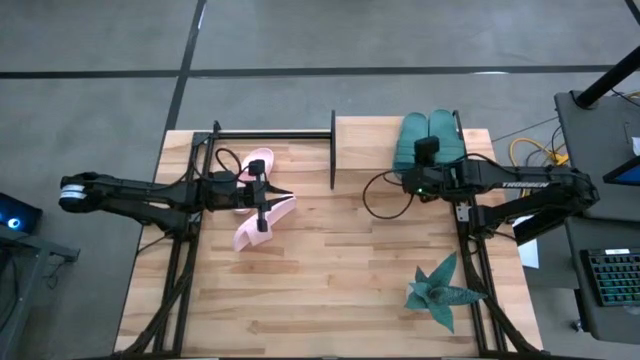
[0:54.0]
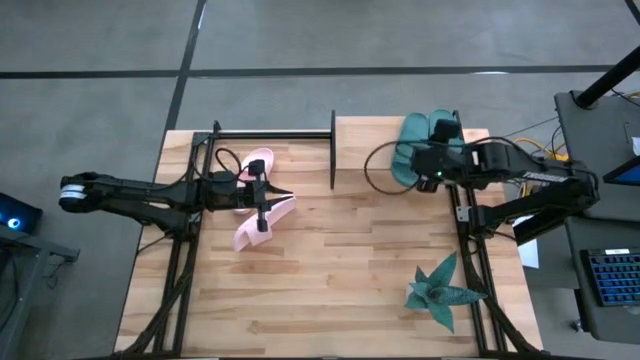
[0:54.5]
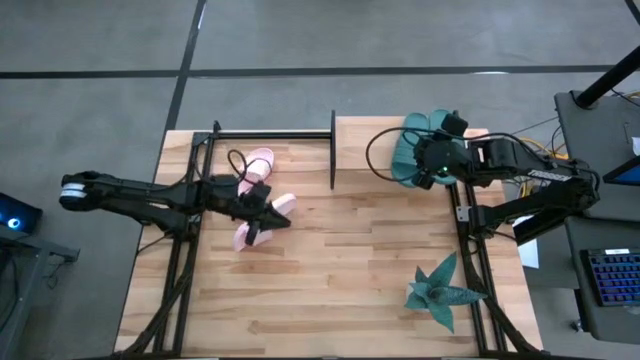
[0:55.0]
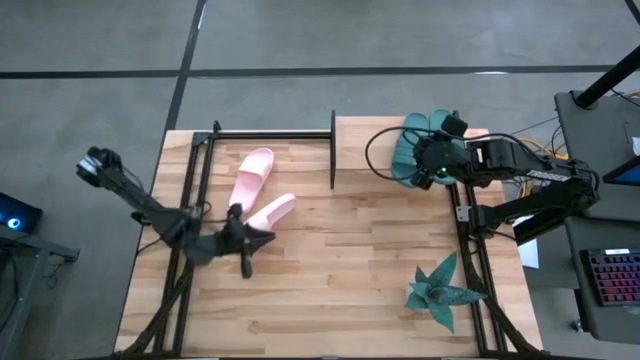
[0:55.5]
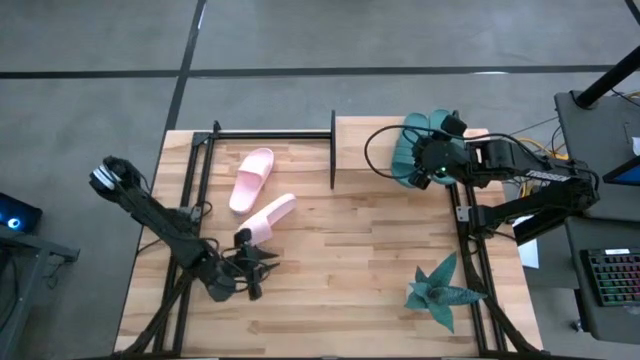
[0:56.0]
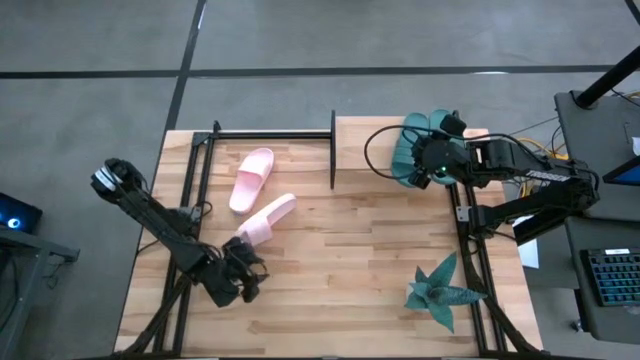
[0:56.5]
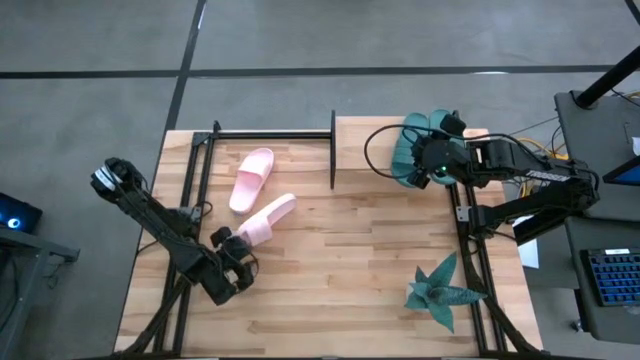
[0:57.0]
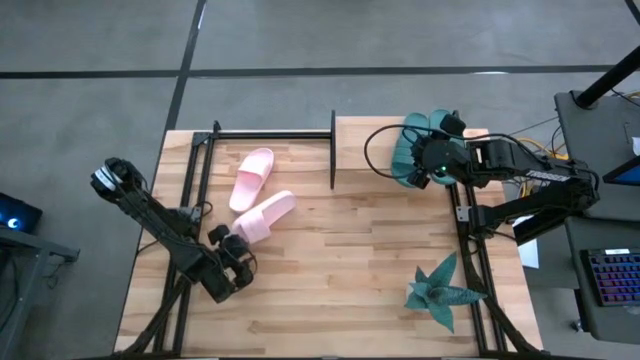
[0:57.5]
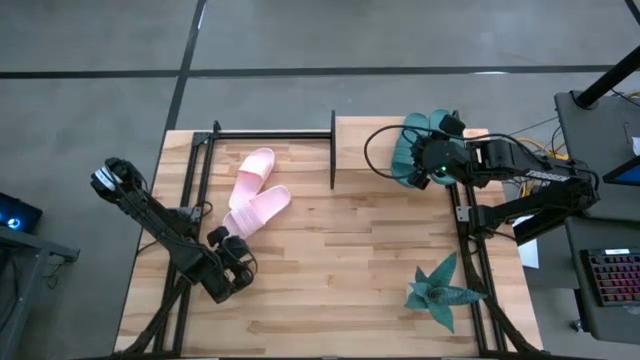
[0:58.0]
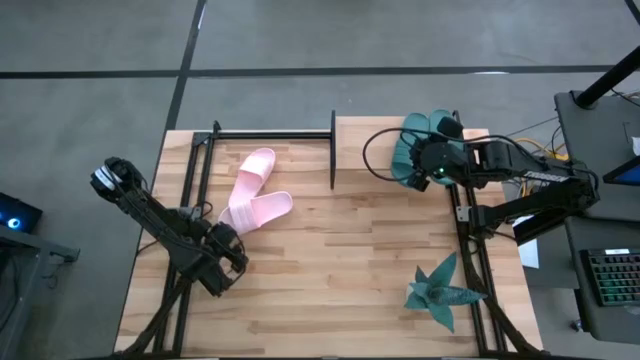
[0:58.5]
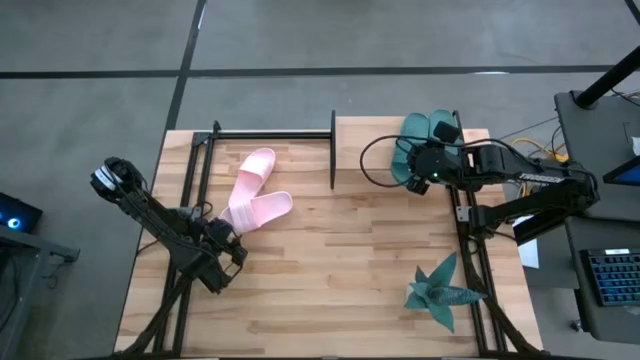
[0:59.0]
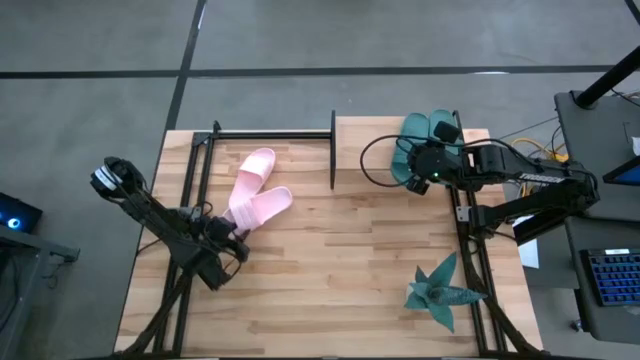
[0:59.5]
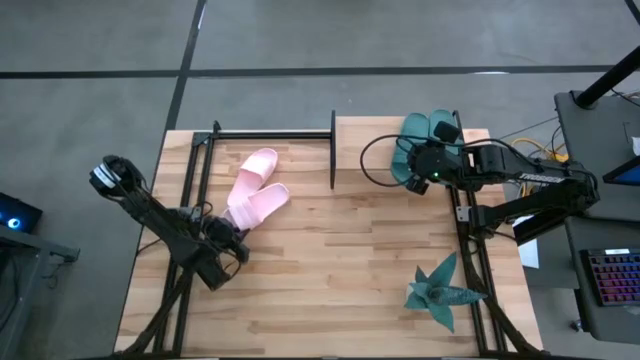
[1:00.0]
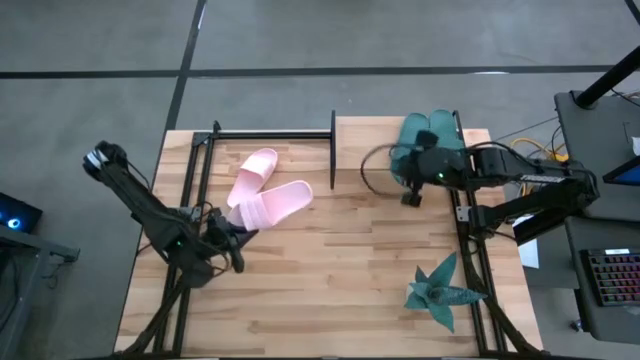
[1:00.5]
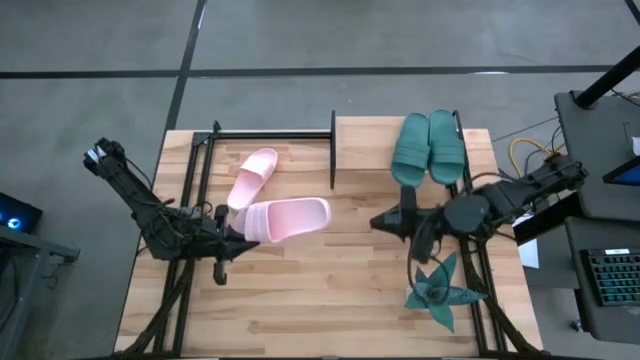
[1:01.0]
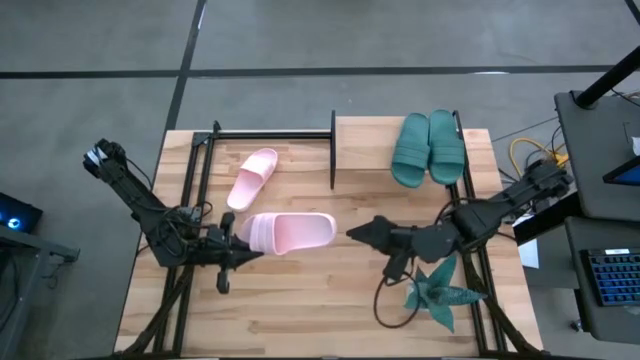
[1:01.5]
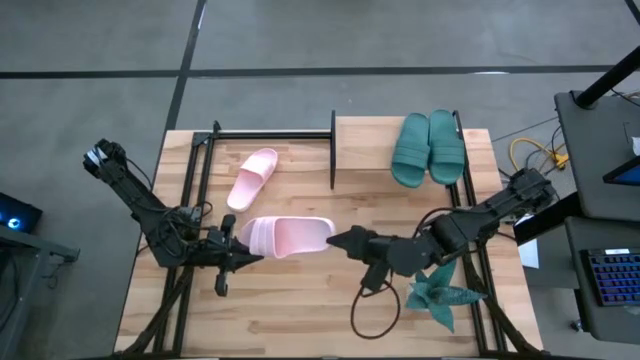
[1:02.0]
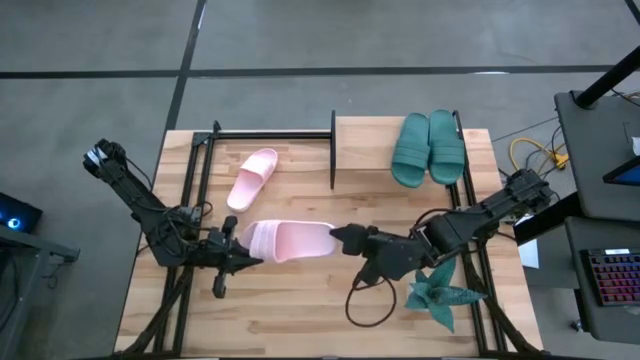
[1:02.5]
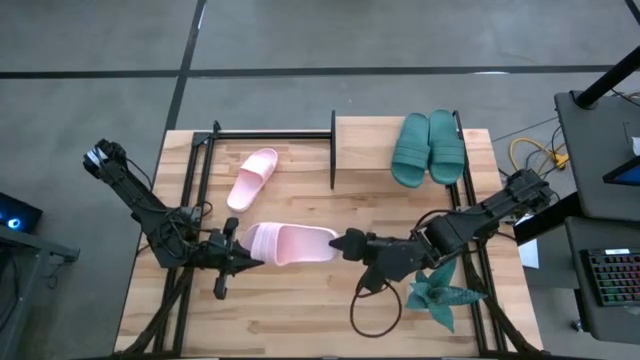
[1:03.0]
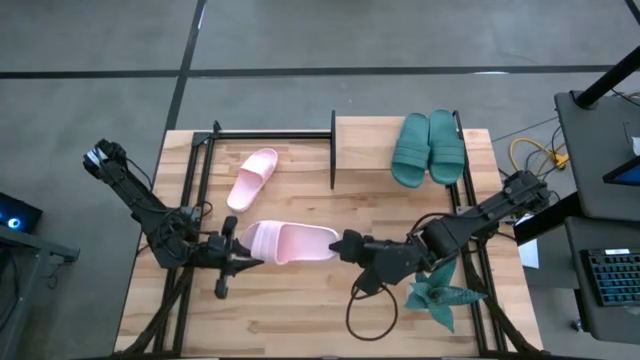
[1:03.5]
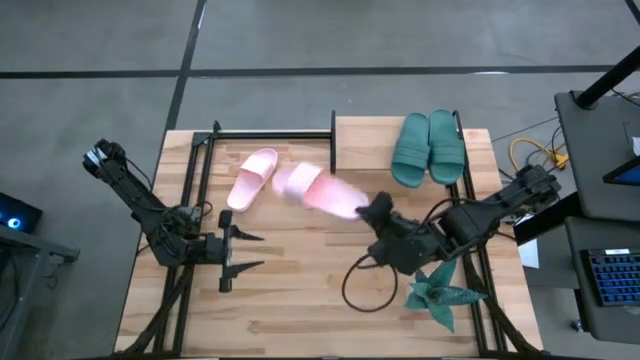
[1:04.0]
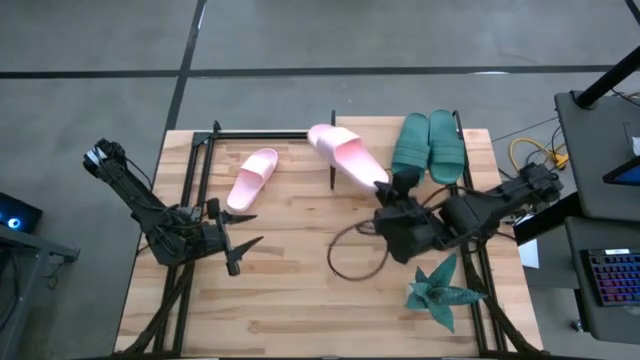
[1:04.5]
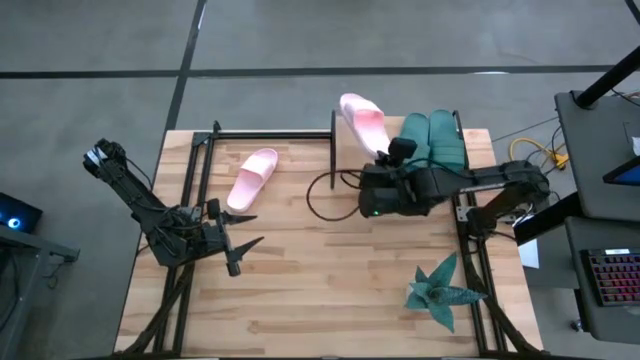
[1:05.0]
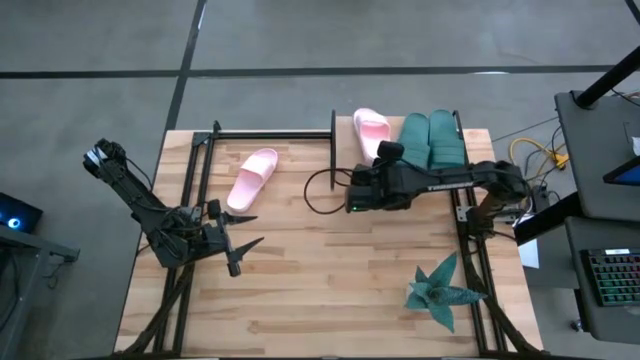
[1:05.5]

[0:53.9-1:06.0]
Task: Pick and place slides into the shelf
Put the bottom pink slide in the bin

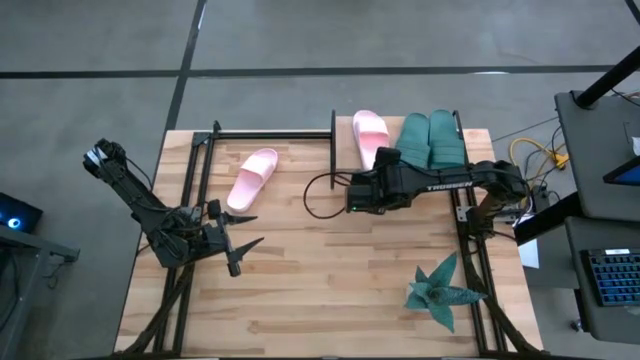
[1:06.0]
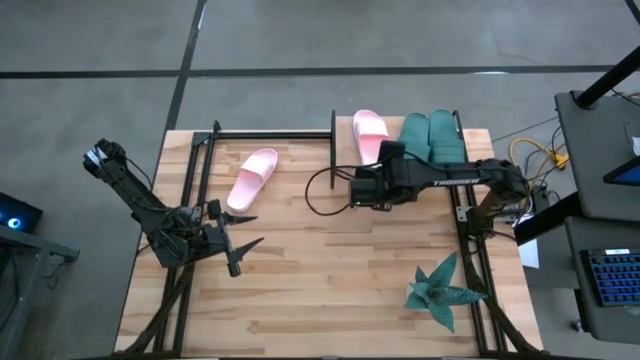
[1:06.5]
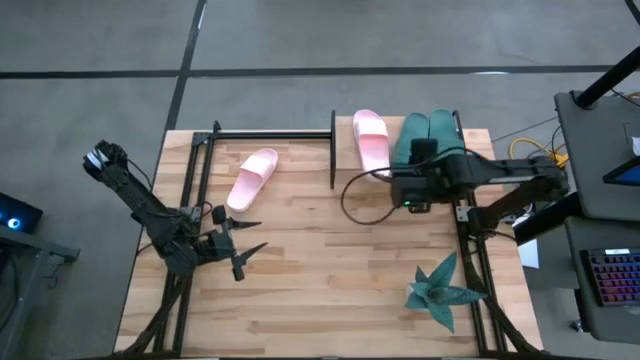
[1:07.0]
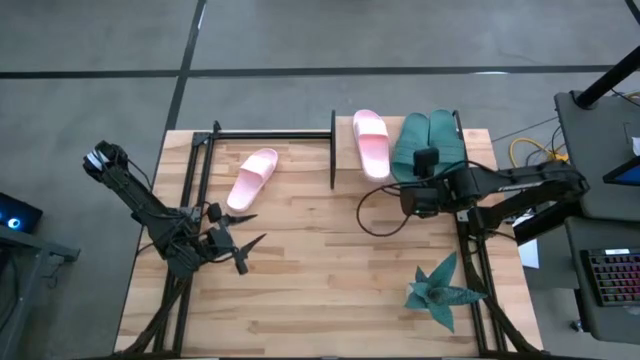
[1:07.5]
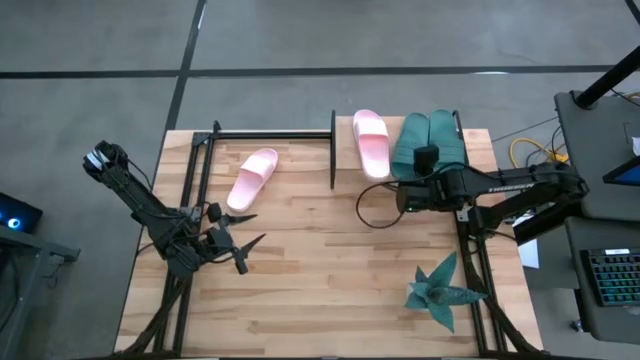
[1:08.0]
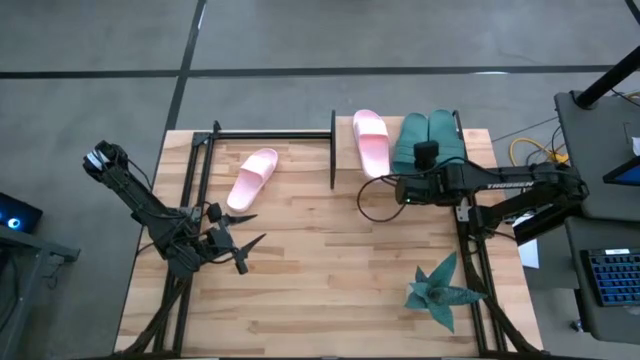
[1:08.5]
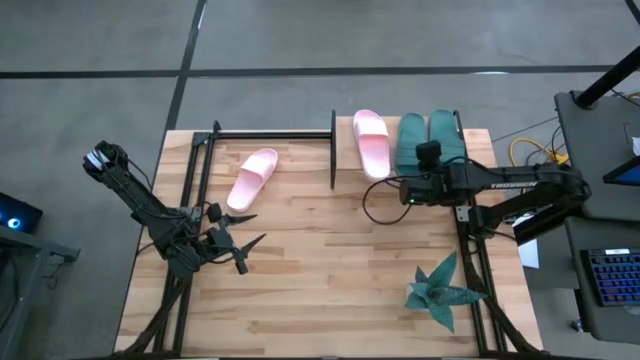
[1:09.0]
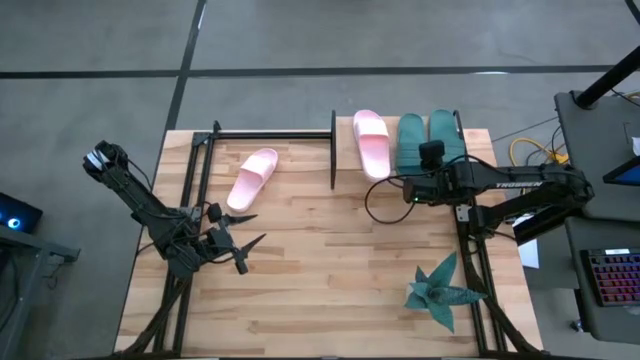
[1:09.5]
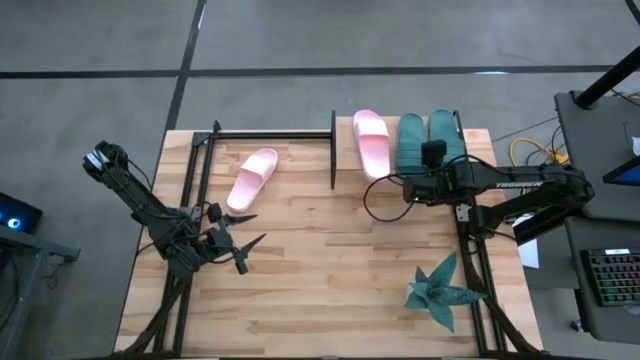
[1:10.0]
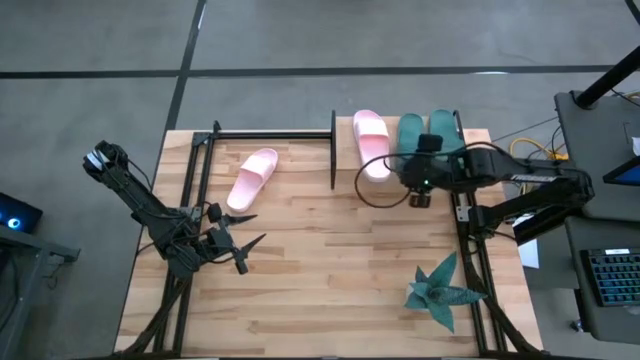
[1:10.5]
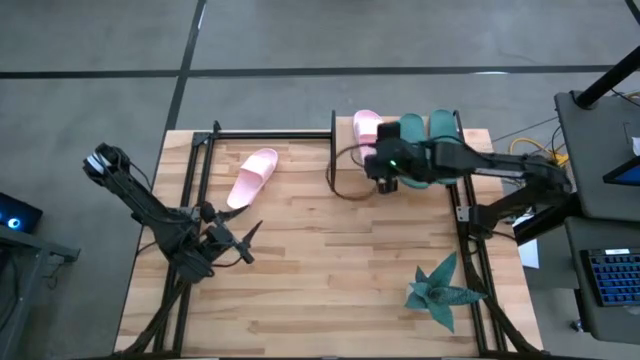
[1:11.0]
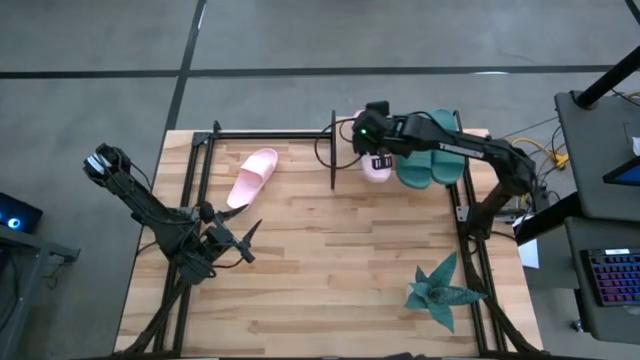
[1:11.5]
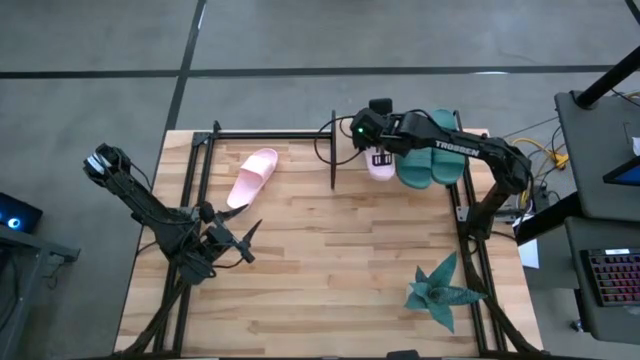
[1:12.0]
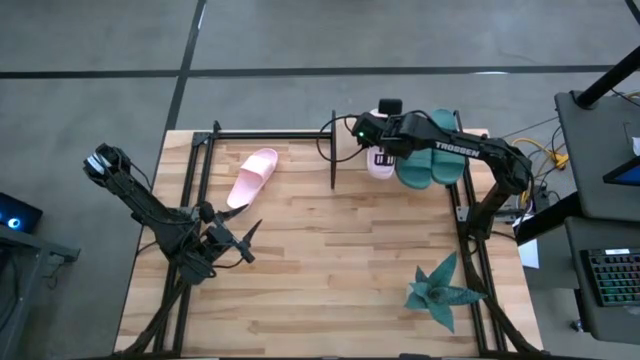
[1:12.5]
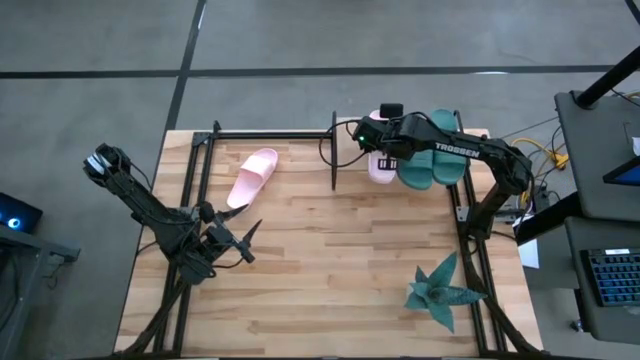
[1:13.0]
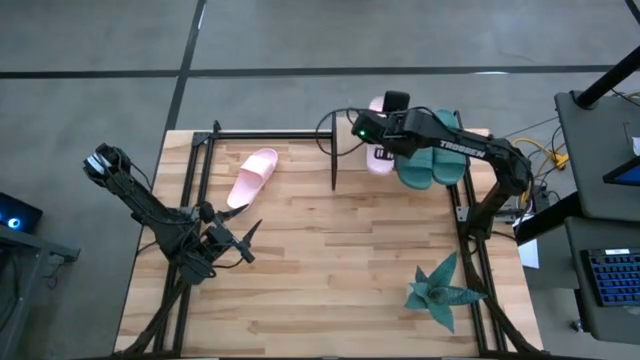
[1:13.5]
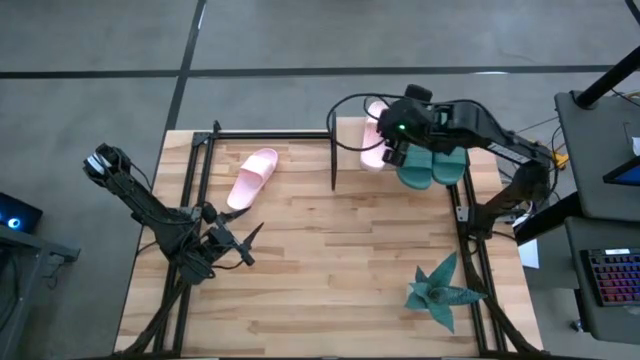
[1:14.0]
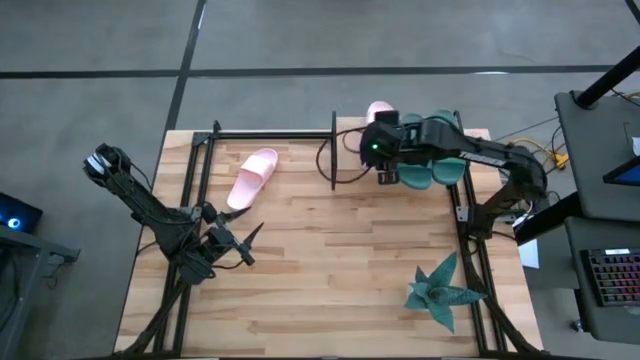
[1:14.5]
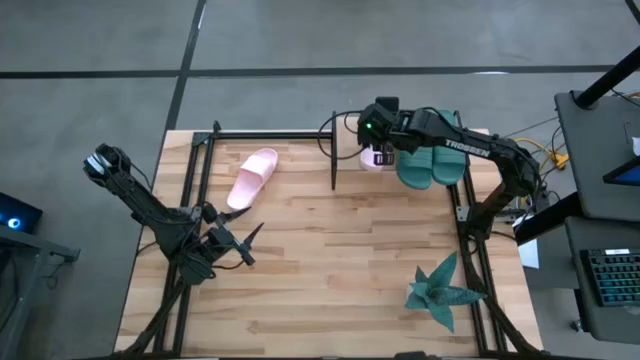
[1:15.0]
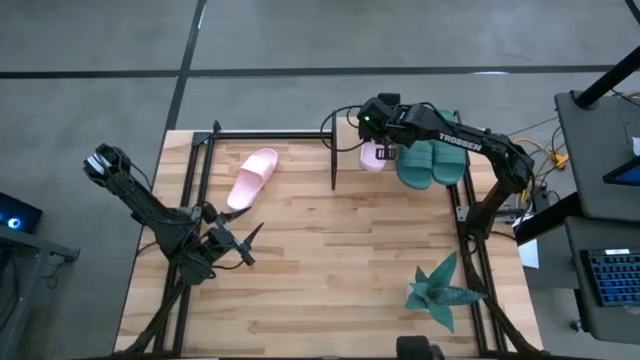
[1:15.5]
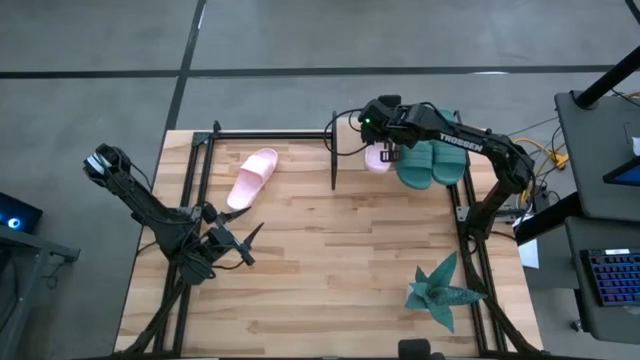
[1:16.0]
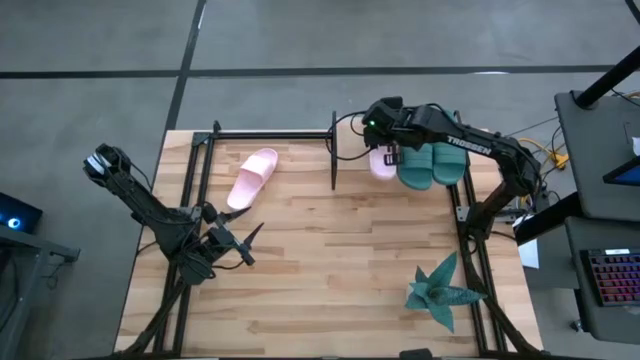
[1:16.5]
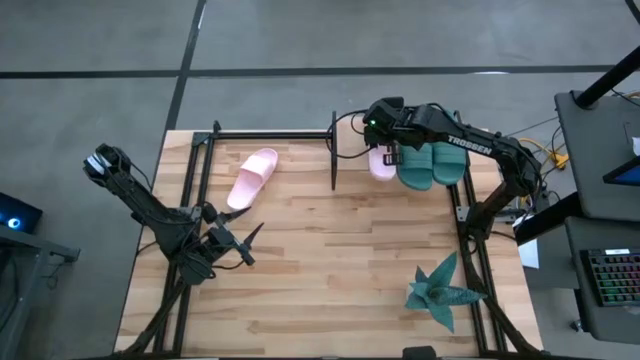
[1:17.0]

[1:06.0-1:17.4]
Adjust the slides on the shelf
